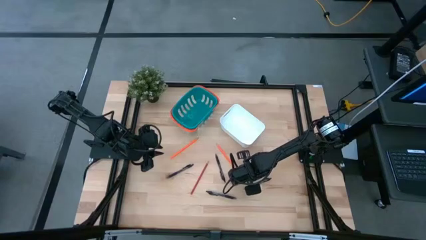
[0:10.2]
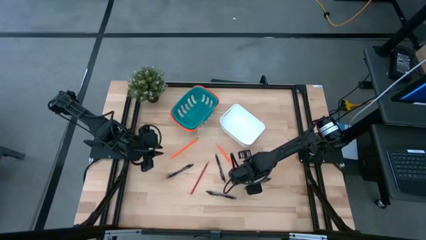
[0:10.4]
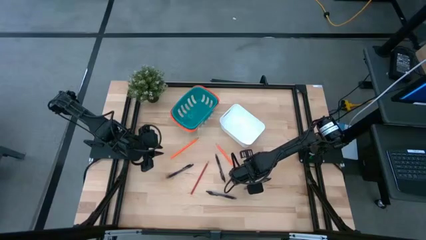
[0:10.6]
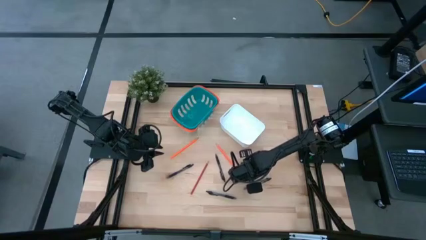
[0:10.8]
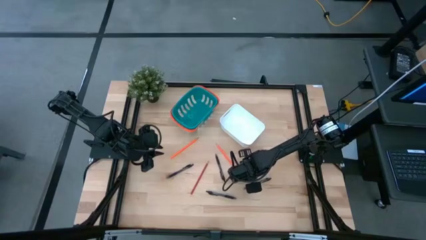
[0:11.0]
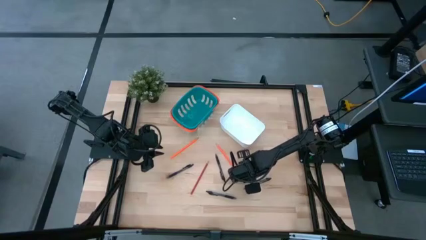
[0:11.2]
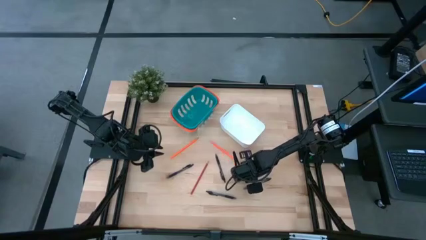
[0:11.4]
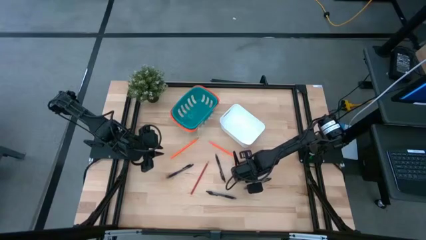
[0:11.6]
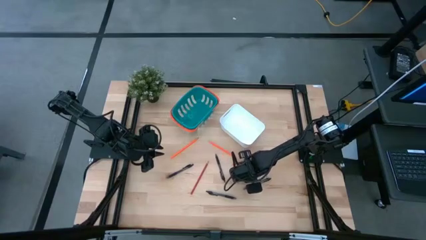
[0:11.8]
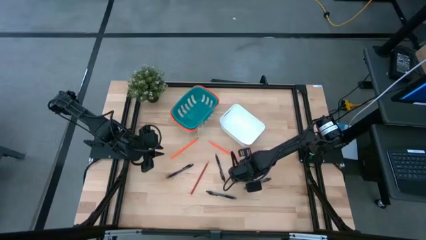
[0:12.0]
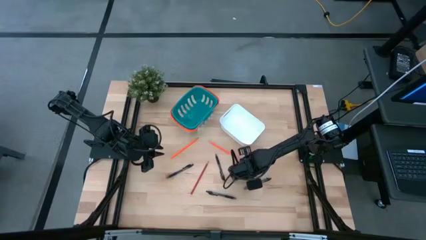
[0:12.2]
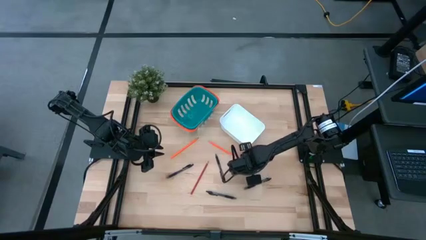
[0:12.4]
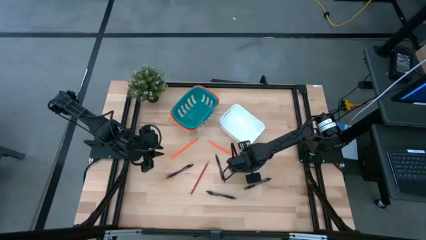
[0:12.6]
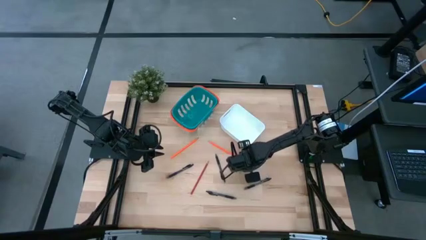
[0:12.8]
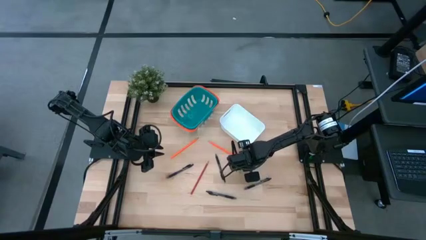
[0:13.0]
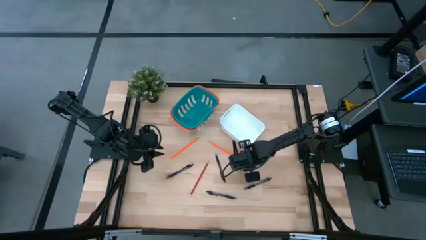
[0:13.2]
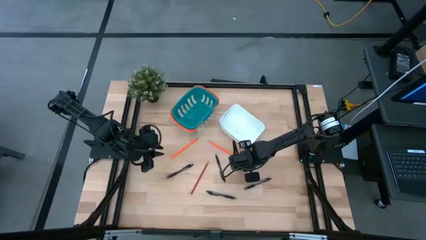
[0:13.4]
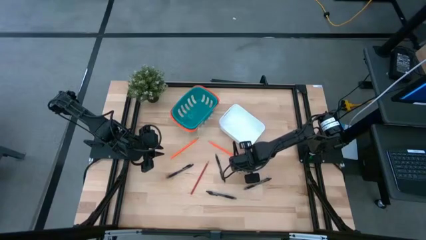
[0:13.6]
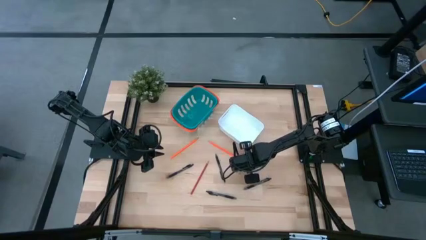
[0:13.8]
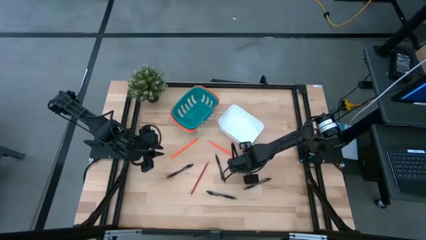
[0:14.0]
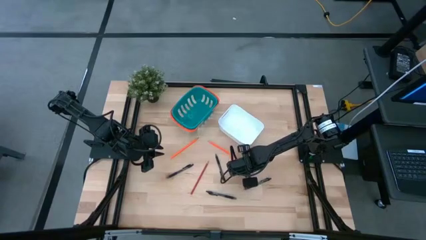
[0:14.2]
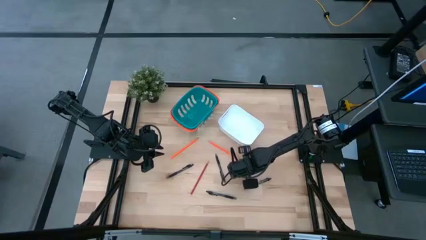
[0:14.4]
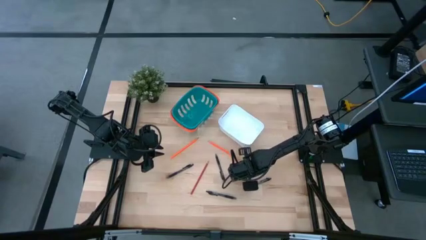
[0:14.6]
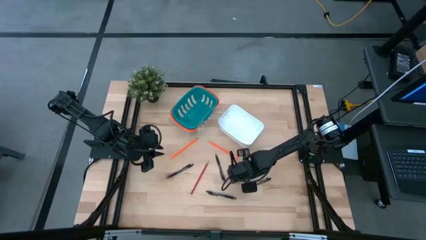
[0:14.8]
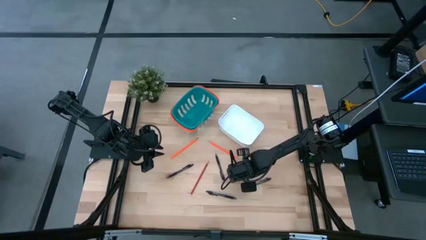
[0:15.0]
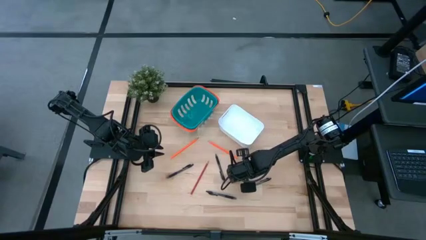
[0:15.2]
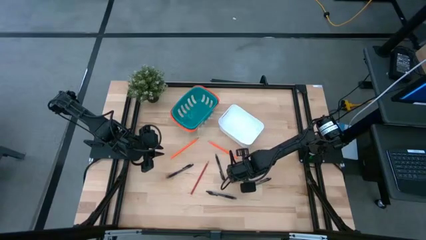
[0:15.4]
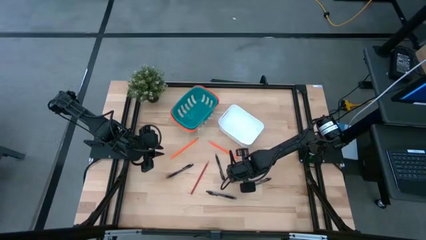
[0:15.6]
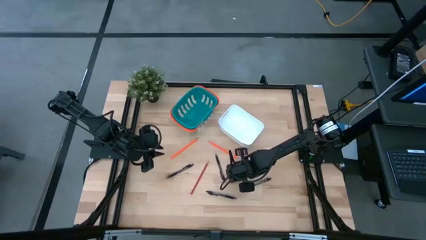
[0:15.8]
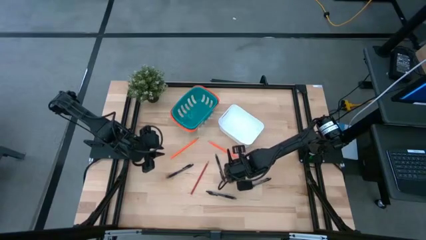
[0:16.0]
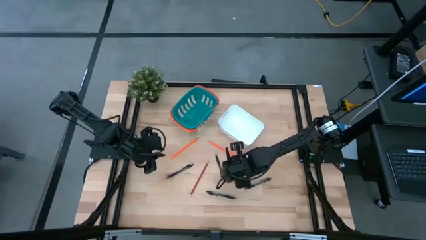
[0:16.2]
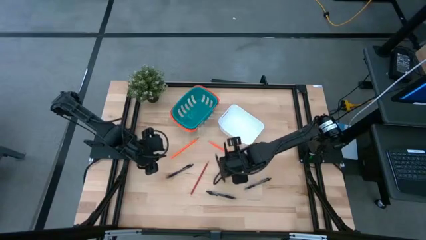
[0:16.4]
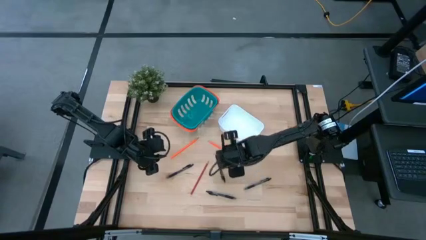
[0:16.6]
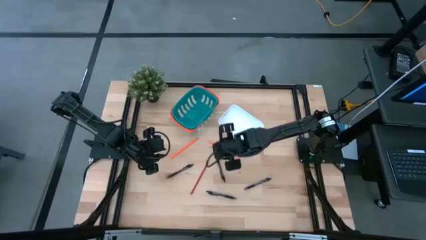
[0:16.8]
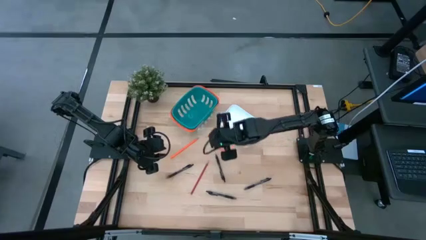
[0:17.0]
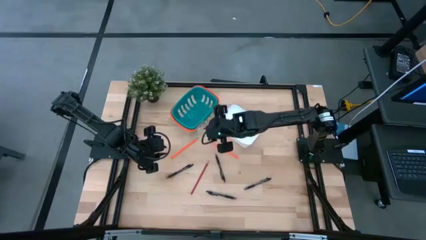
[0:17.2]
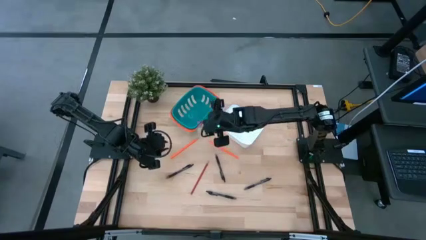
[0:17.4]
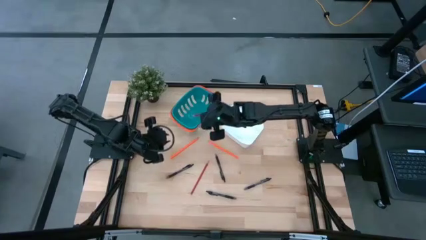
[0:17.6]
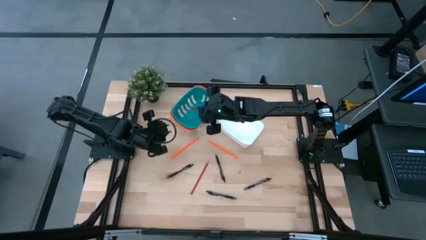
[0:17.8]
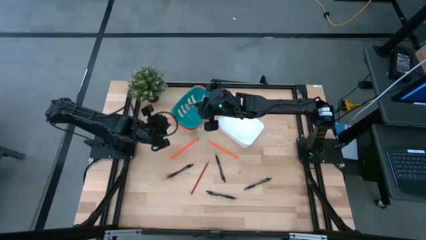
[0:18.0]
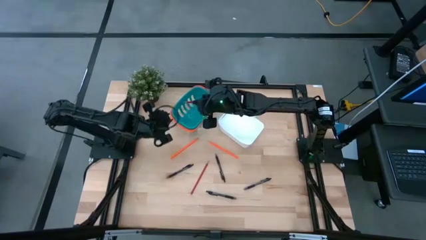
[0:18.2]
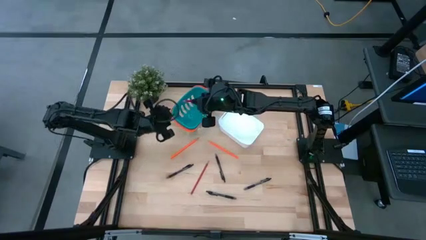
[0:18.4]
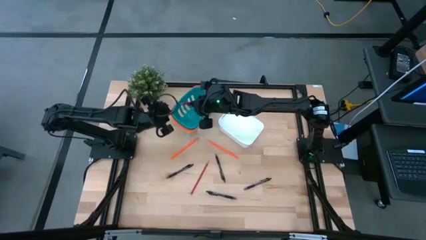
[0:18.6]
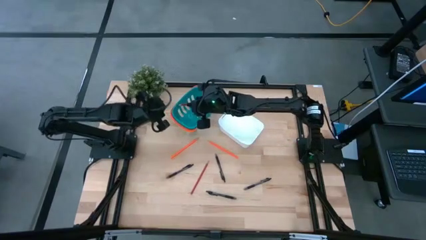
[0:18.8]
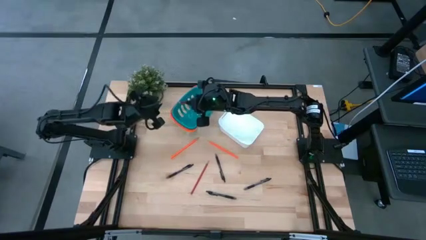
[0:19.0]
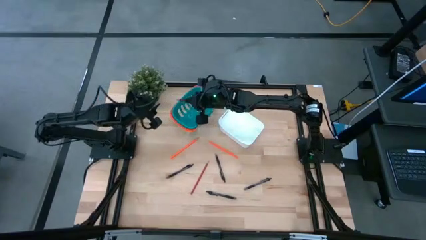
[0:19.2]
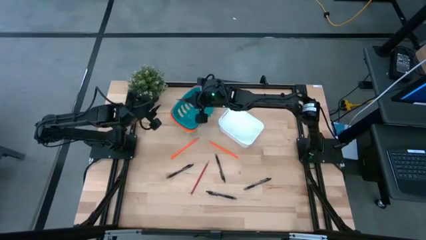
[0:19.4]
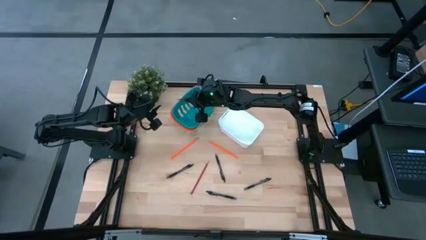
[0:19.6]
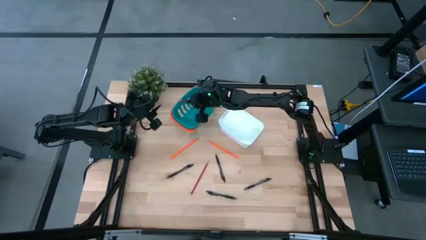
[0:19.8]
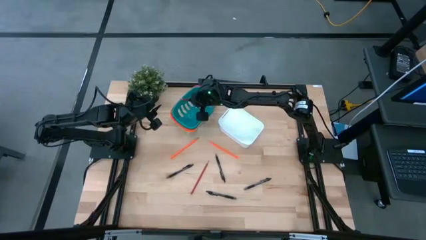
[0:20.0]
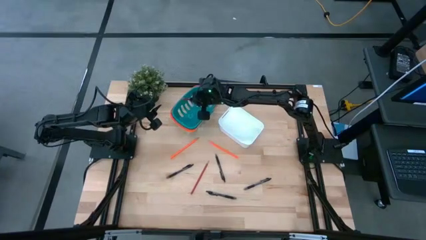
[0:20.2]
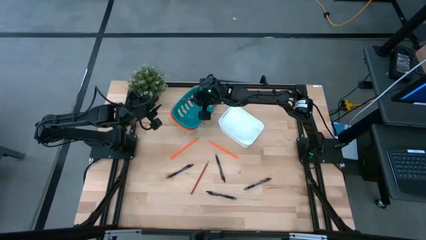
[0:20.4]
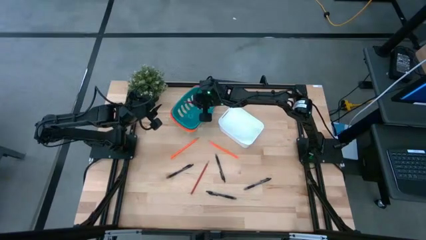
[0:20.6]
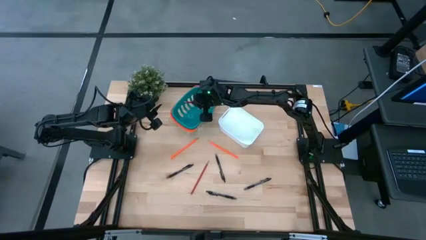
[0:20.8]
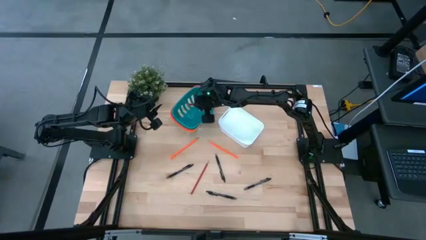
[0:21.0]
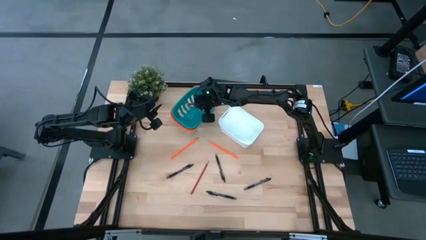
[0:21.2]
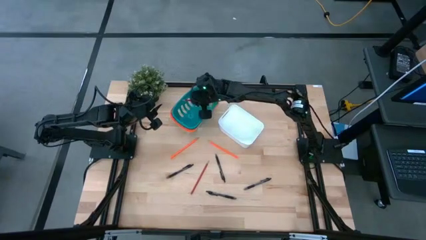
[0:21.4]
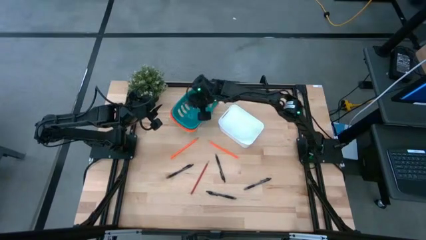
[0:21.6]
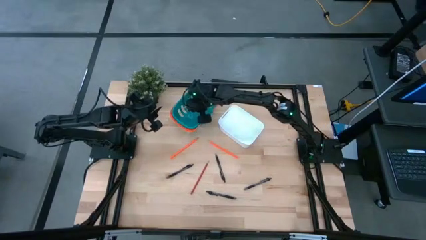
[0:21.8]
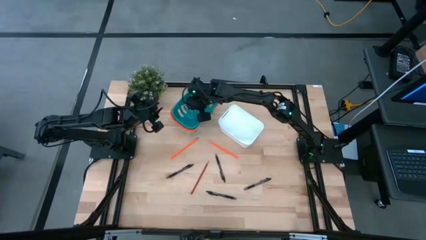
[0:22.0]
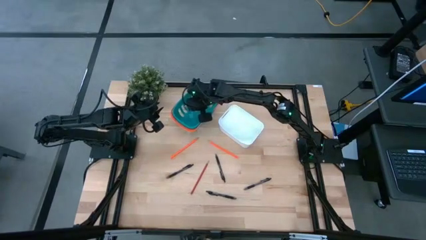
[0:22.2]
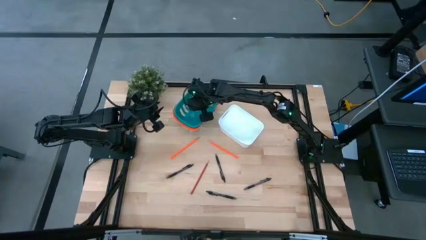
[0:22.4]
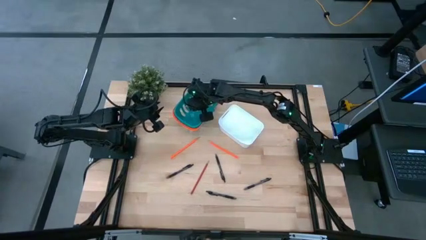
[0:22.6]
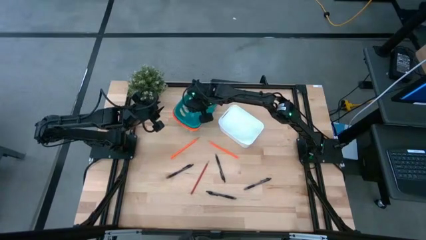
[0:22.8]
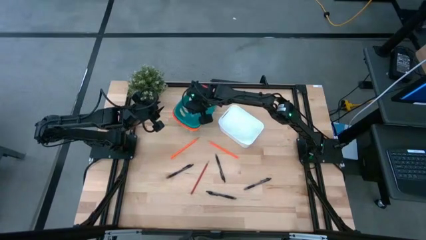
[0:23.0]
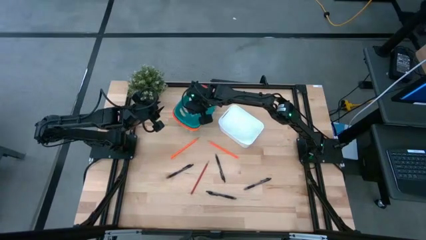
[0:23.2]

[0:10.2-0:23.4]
Task: Sort pens & pencils
Put the right red pencil into the blue bin

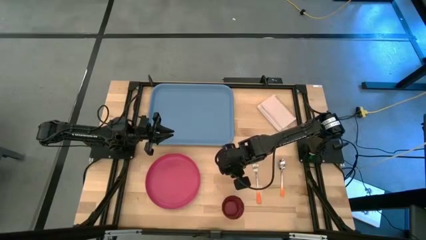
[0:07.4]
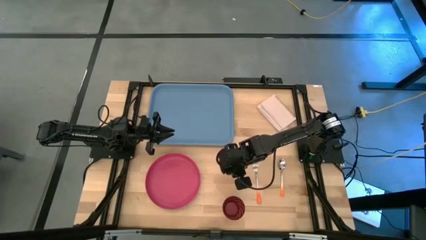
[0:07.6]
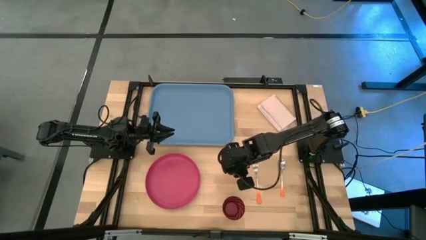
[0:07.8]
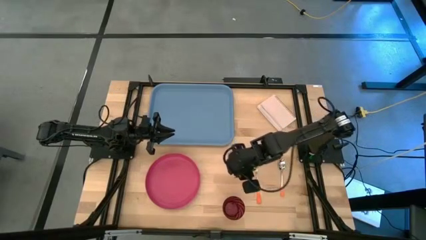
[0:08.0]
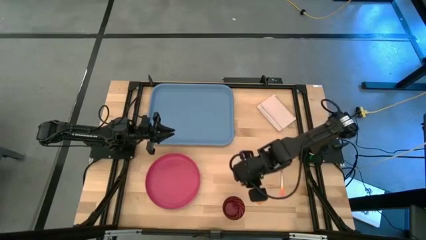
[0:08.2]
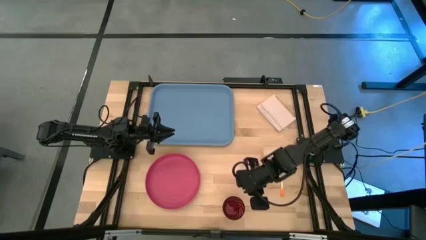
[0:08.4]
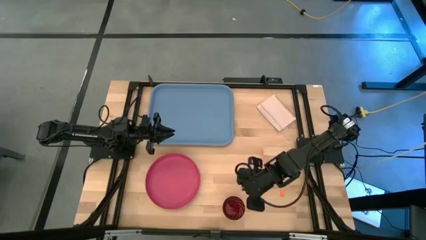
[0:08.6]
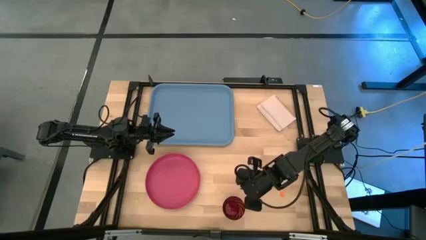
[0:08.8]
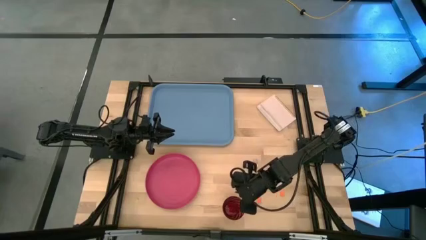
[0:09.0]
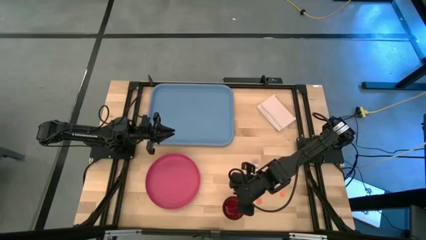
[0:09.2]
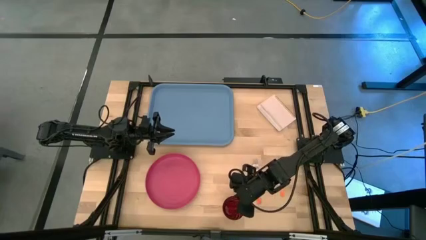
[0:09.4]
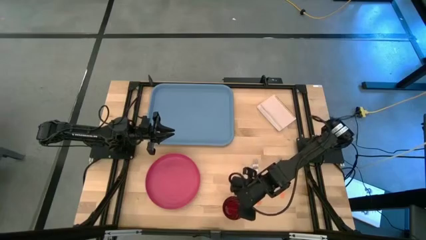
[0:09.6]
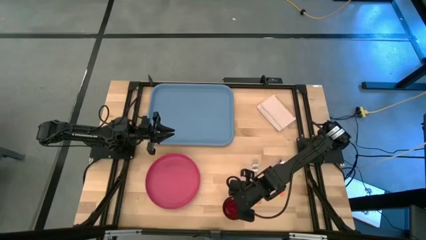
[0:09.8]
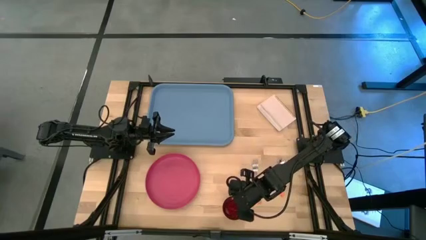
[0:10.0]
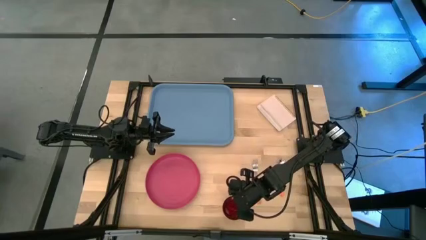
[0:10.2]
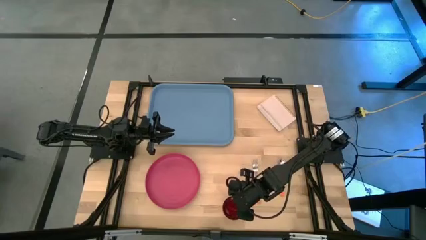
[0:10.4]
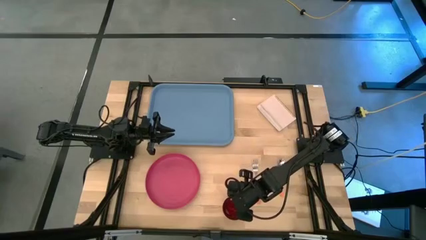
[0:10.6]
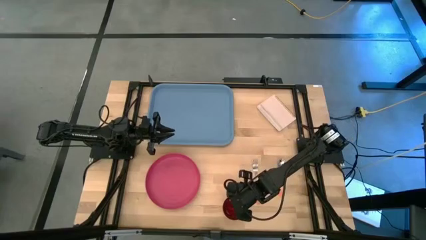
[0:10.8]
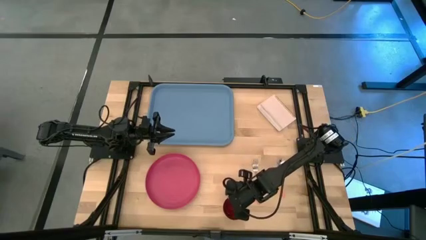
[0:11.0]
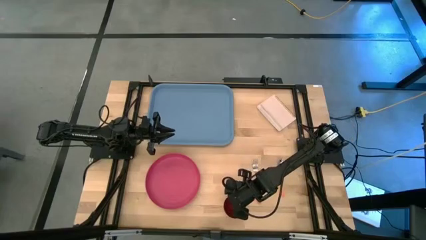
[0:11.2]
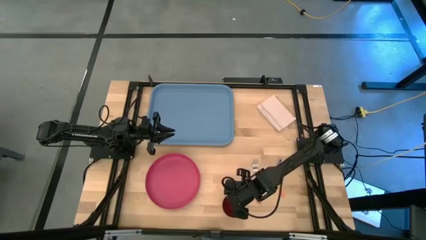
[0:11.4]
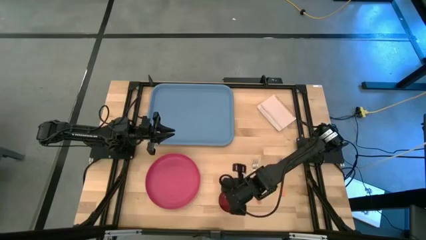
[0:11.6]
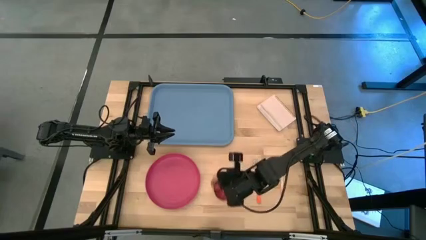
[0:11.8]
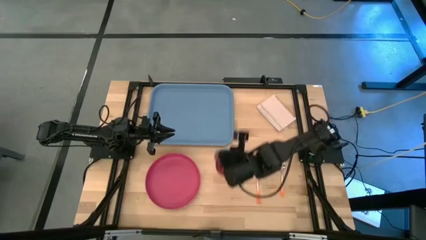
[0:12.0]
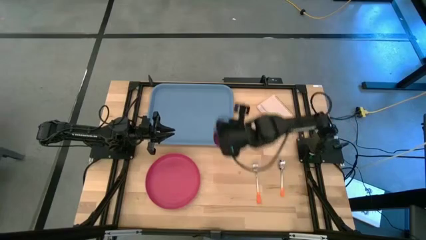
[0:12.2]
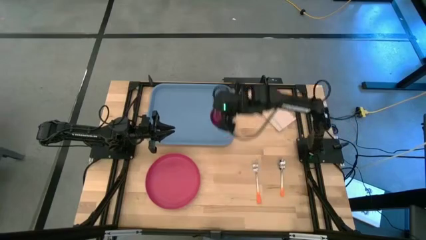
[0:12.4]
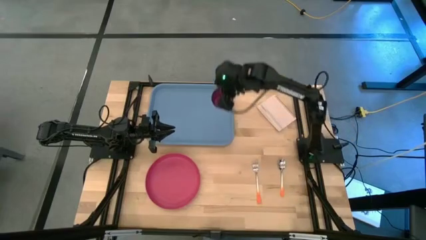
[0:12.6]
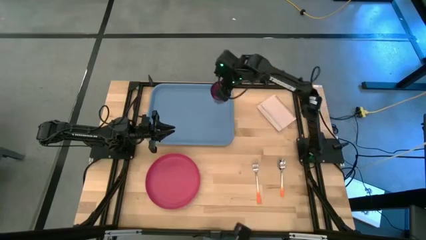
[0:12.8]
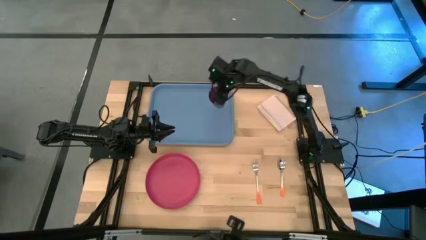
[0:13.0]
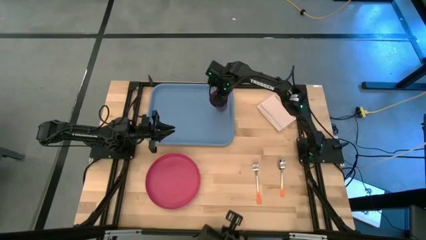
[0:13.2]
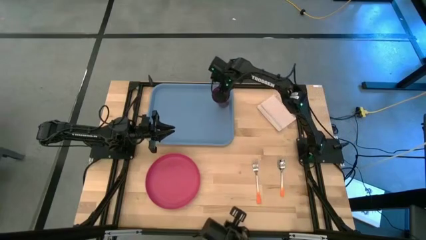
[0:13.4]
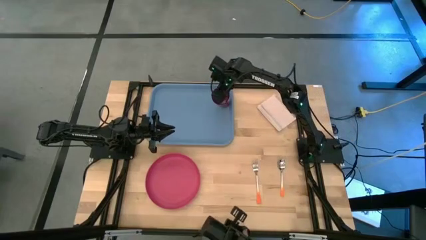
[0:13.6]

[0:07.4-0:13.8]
Task: Pick and place plate/cup/fork/spoon on tray
Put the red glass on the blue tray
